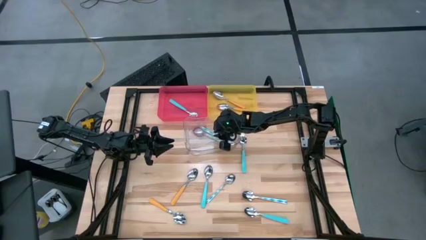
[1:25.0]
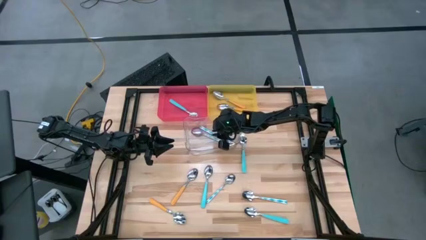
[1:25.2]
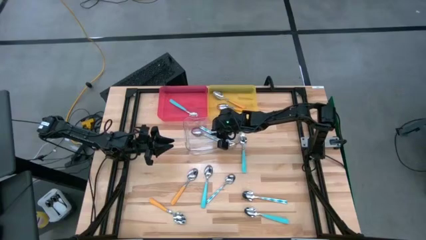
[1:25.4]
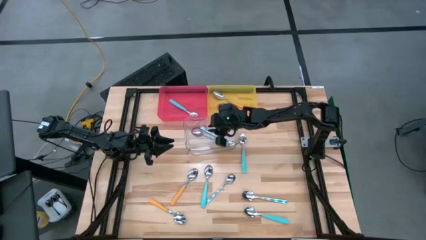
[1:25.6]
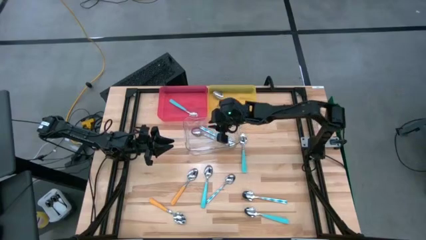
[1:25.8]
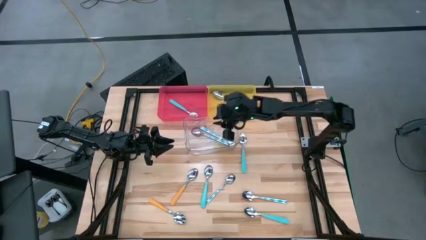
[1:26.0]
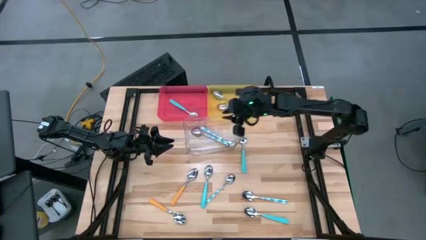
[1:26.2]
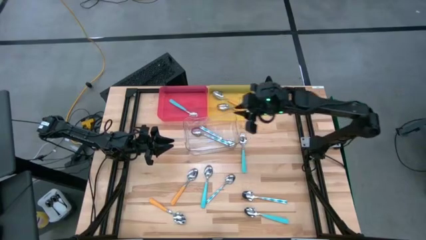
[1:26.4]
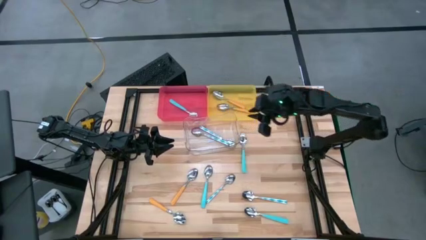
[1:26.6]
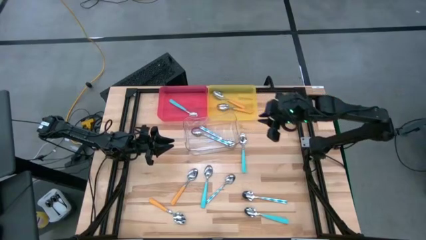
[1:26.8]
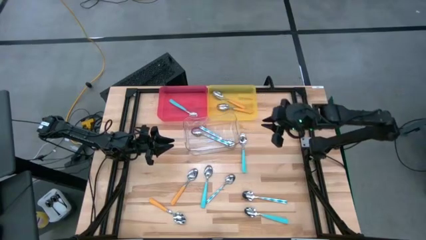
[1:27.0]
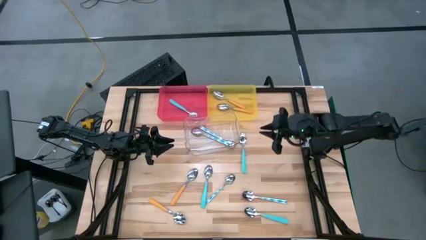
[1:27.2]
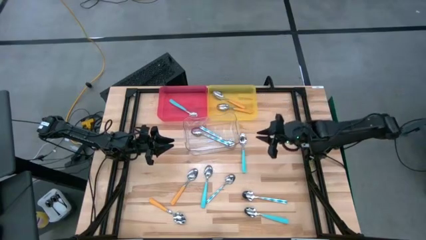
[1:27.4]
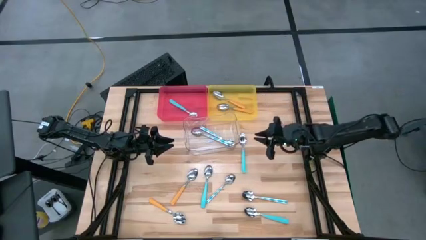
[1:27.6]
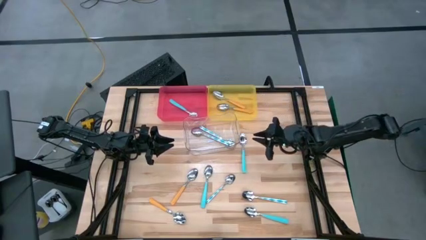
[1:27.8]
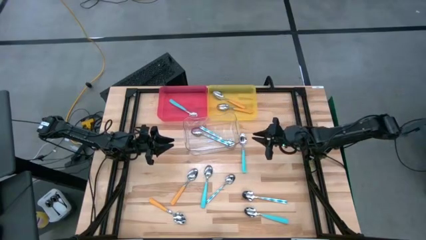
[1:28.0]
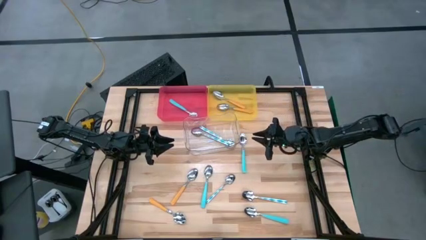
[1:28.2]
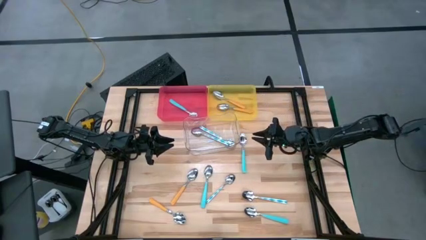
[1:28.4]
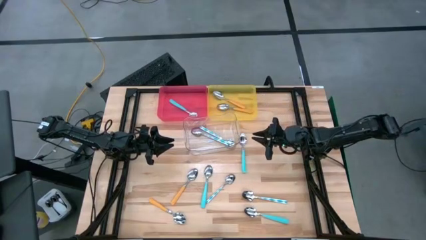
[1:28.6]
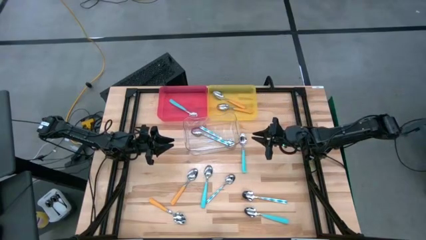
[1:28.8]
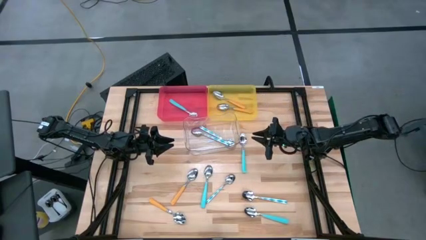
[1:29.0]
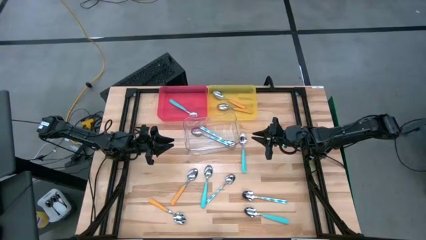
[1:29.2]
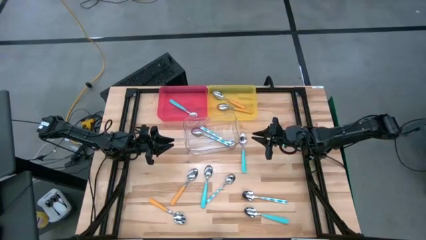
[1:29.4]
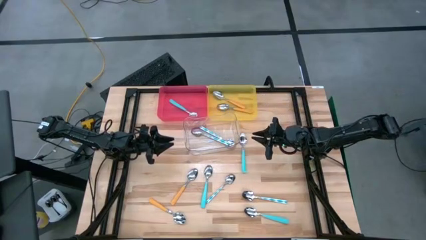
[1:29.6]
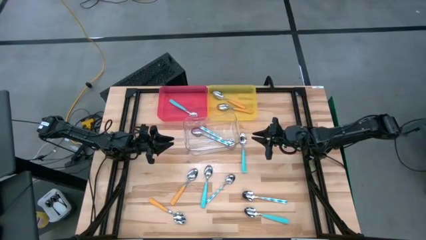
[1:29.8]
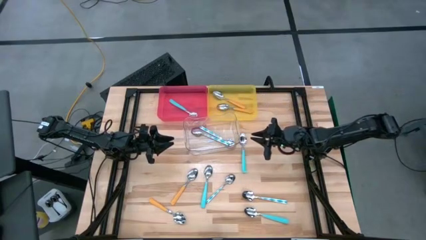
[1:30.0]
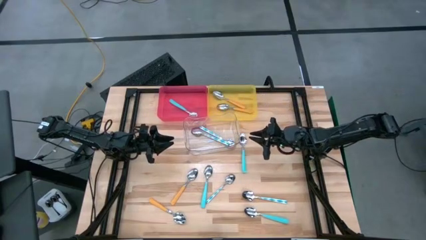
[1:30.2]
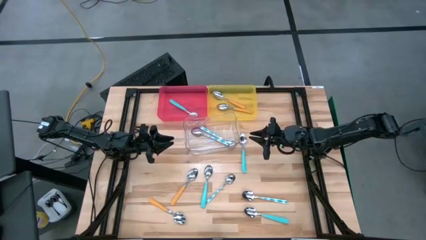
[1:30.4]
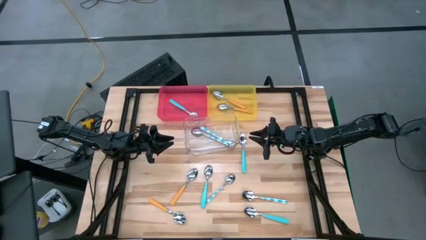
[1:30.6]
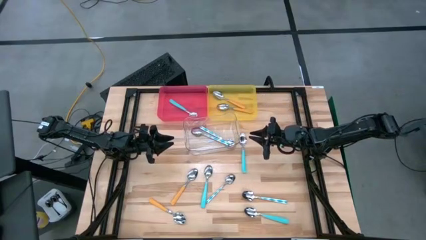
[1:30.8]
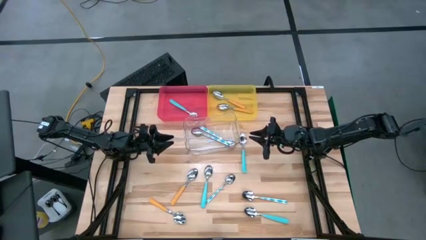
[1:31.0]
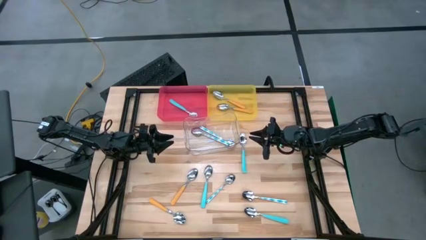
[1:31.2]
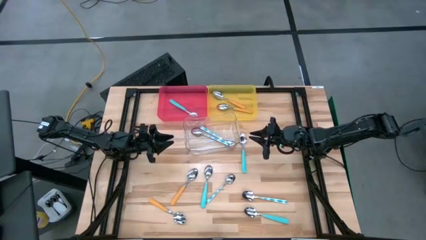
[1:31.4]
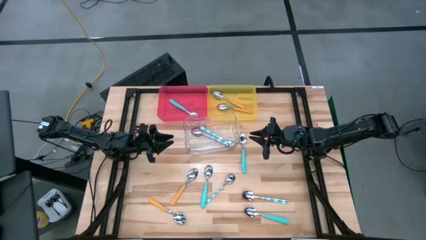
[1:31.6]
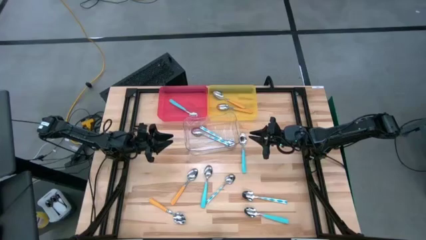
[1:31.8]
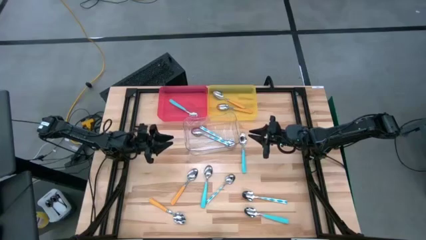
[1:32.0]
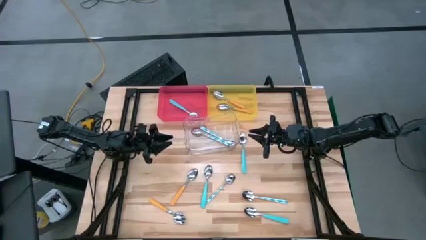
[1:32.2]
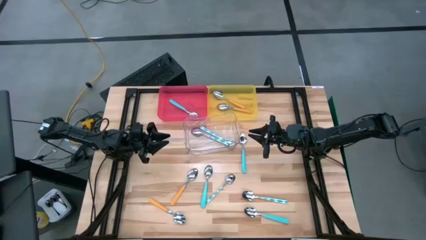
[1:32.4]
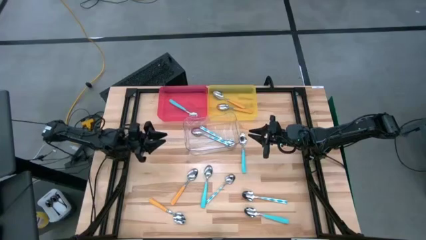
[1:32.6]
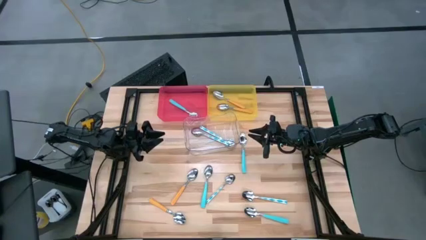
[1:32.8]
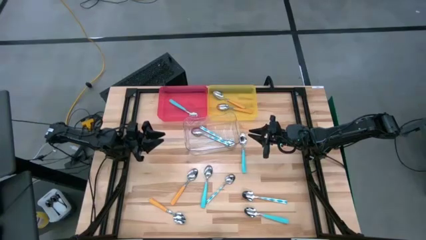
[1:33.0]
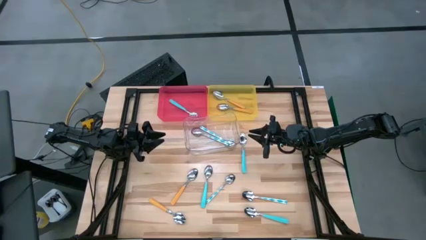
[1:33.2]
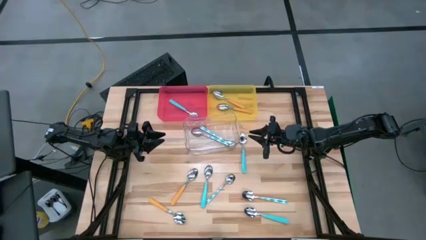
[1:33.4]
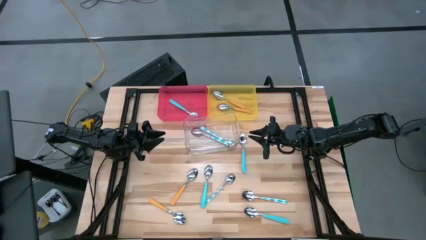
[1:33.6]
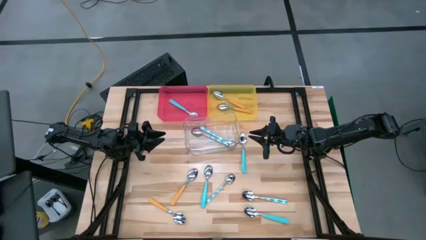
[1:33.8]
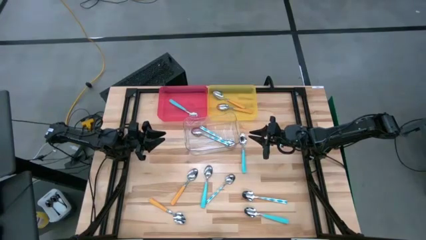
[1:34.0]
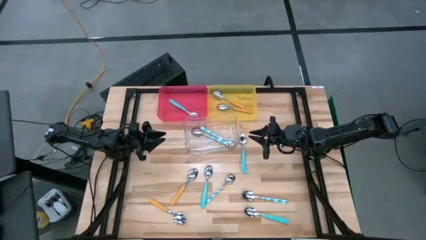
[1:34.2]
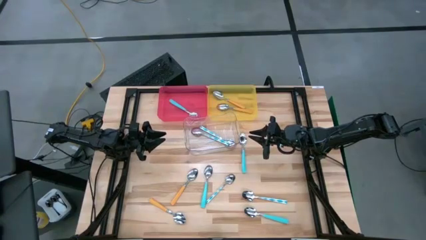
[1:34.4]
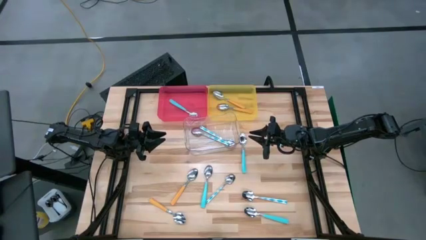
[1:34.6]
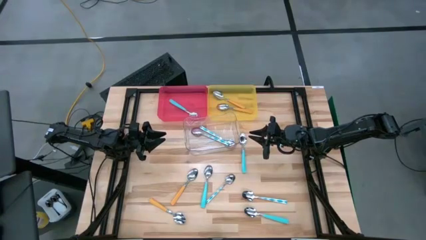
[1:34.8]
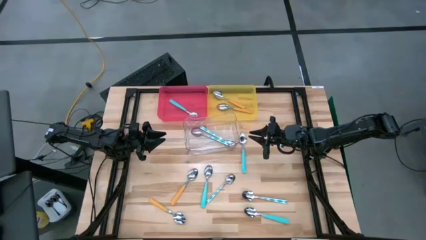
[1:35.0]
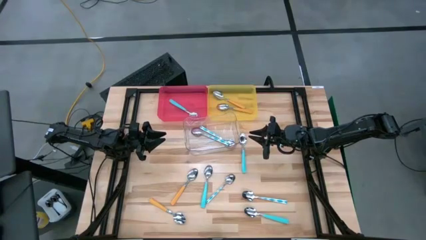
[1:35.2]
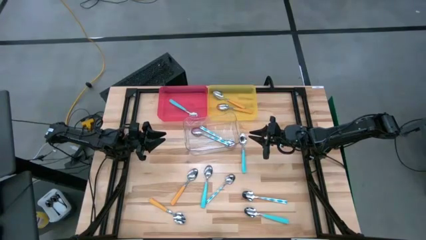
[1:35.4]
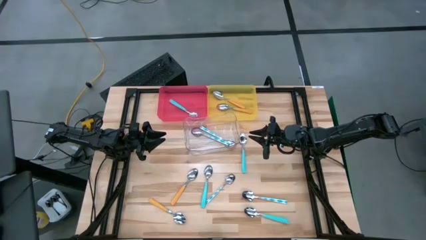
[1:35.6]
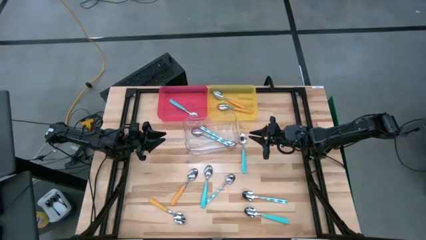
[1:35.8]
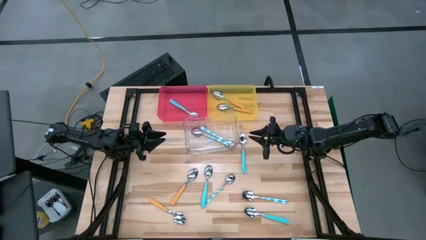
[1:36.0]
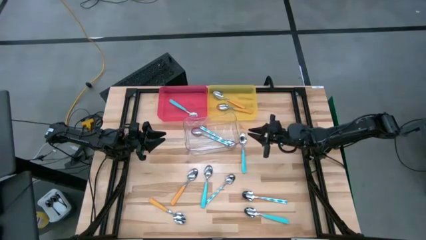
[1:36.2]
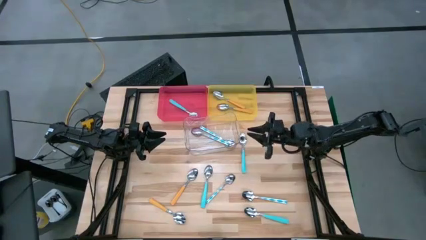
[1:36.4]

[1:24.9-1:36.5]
Task: Sort silverware by color (type)
Put the light green spoon into the red bin
